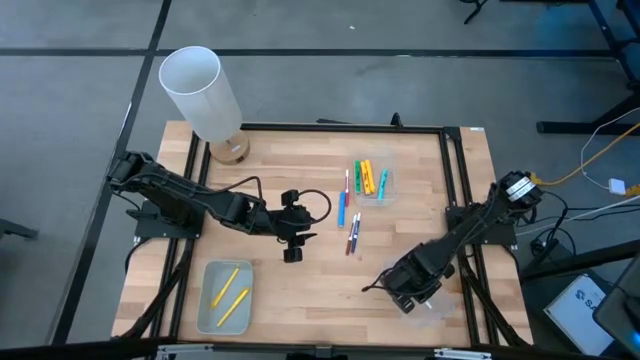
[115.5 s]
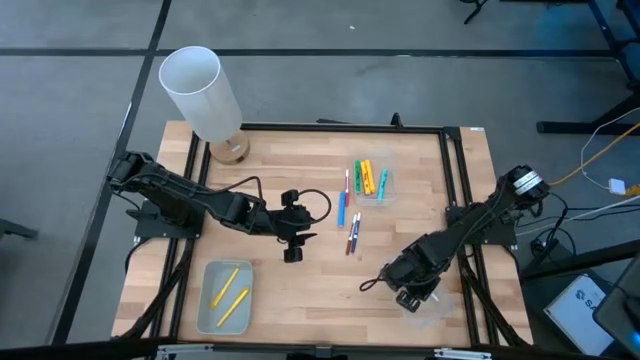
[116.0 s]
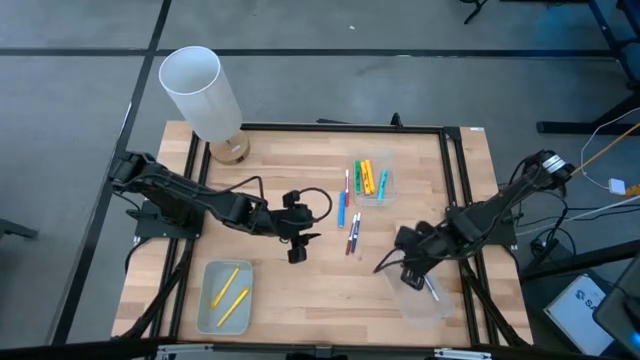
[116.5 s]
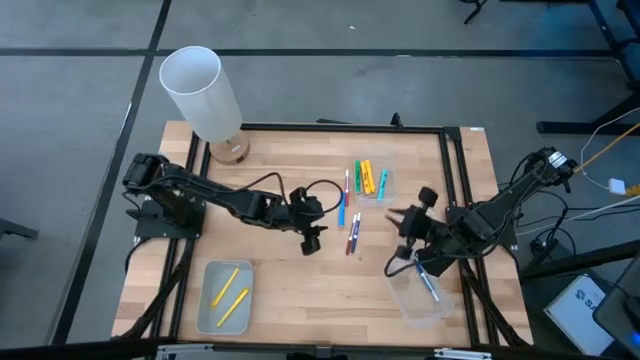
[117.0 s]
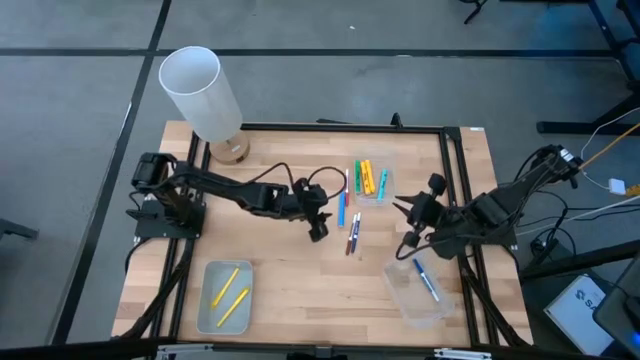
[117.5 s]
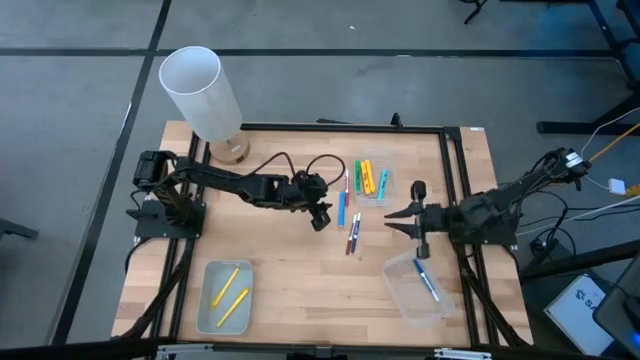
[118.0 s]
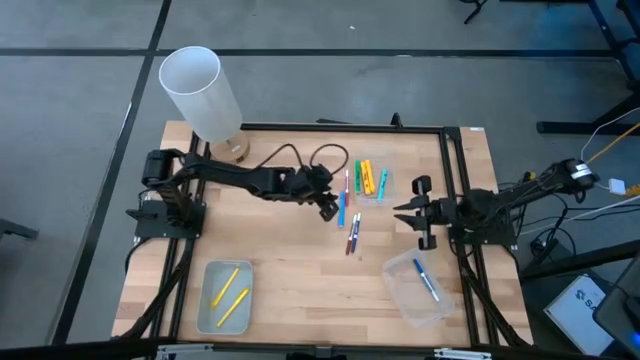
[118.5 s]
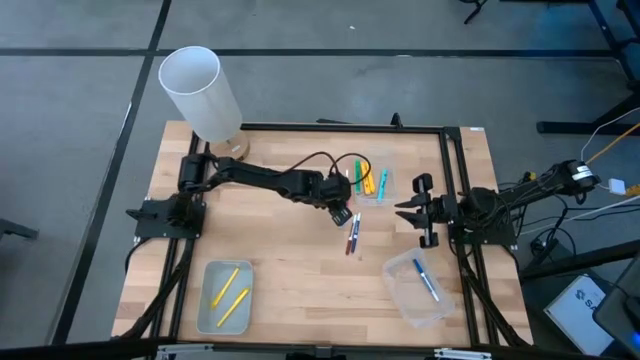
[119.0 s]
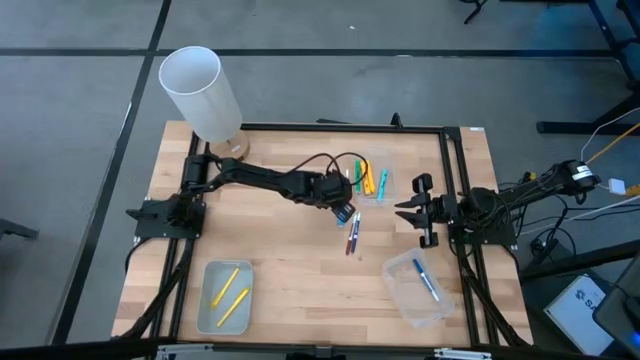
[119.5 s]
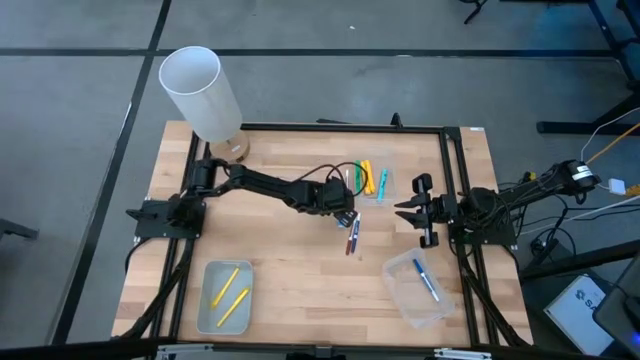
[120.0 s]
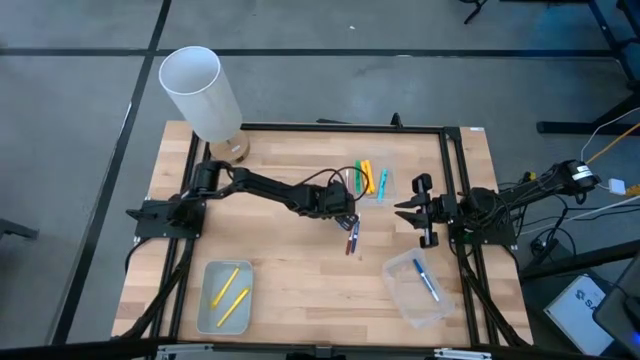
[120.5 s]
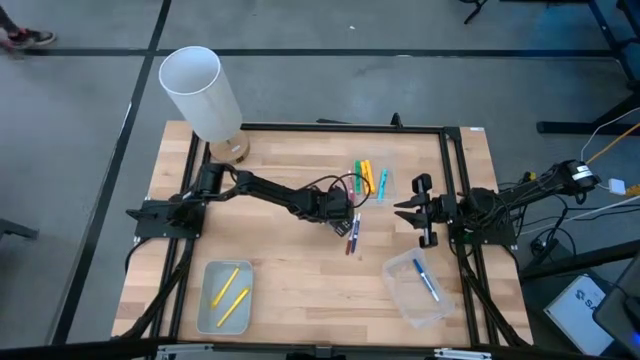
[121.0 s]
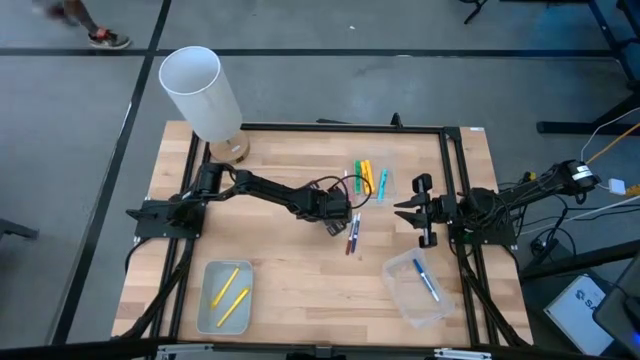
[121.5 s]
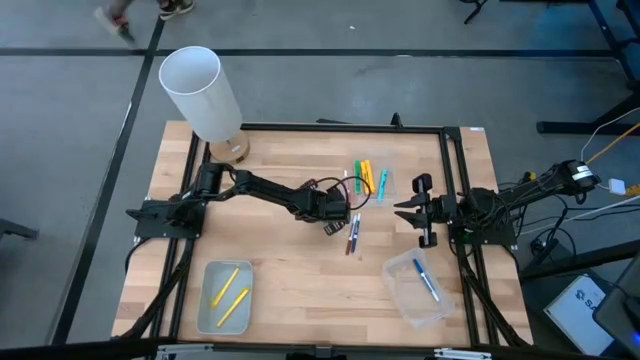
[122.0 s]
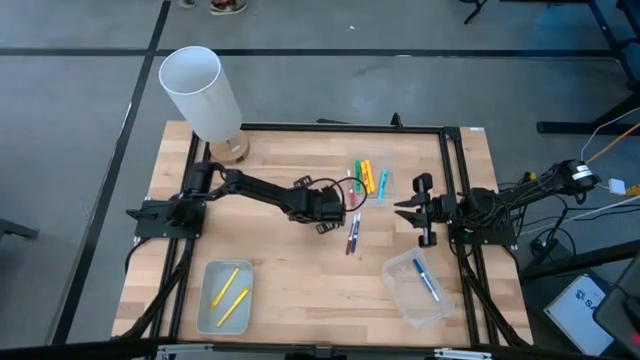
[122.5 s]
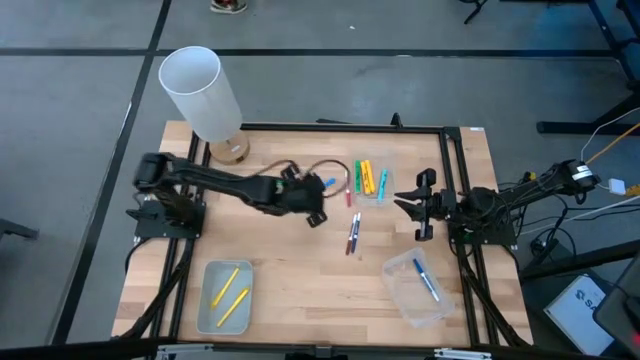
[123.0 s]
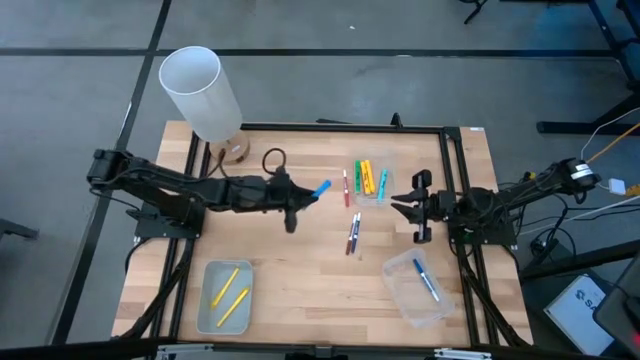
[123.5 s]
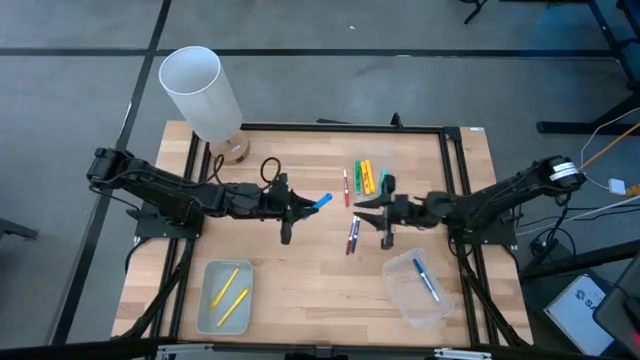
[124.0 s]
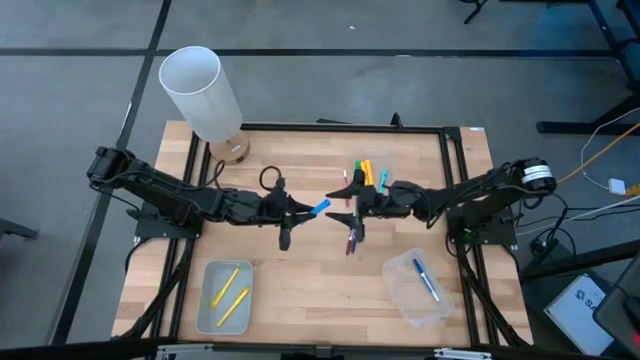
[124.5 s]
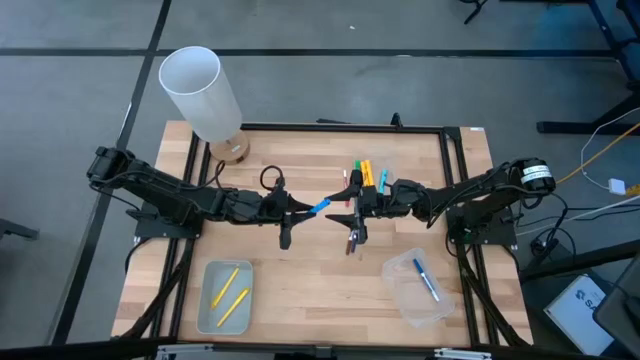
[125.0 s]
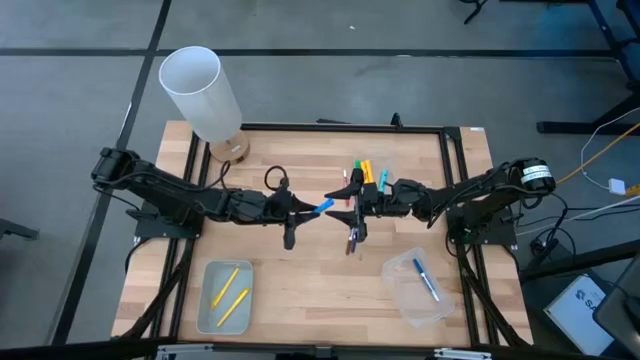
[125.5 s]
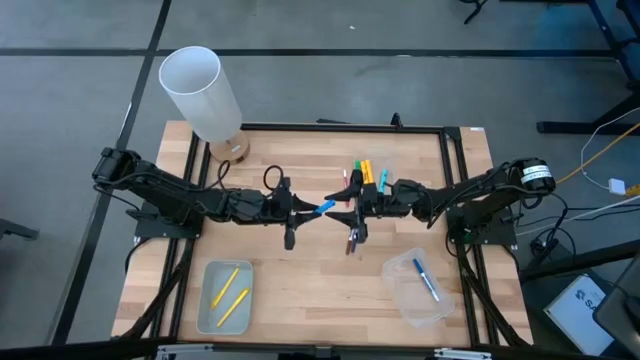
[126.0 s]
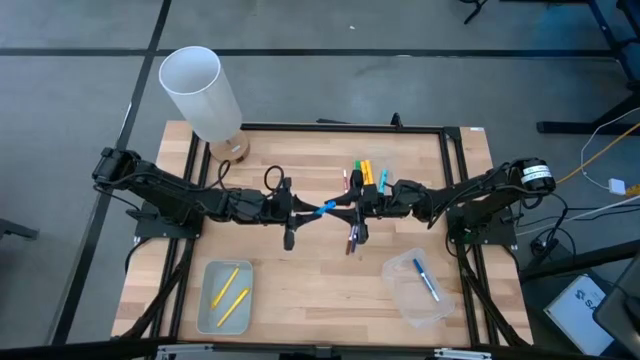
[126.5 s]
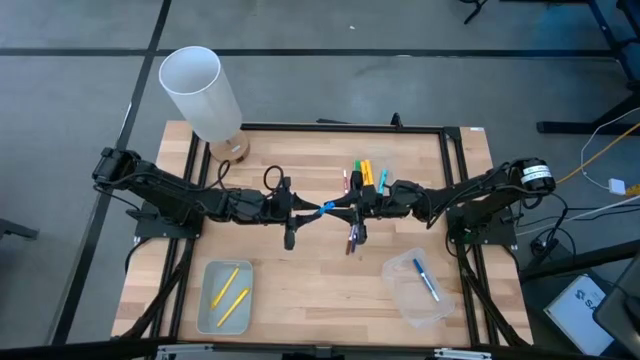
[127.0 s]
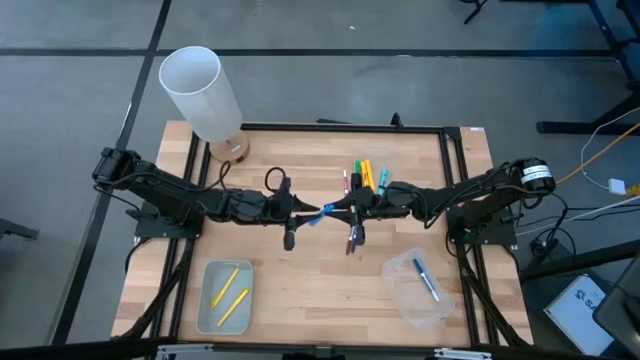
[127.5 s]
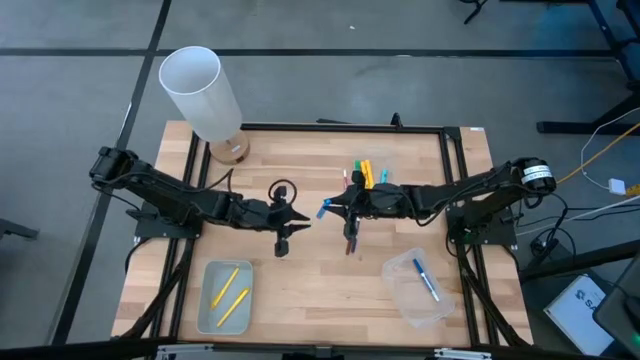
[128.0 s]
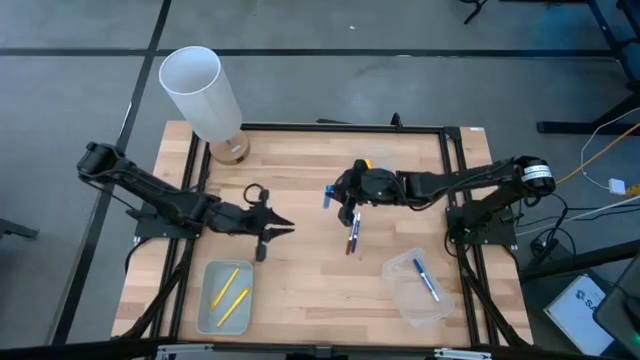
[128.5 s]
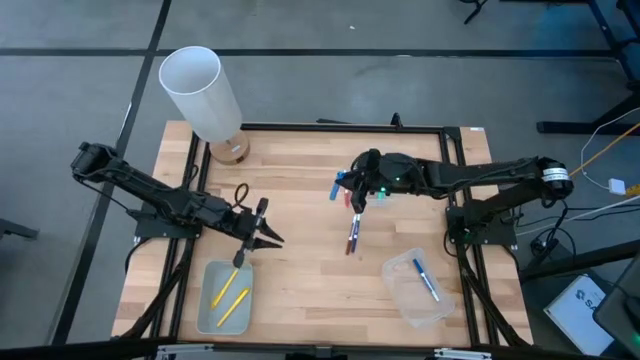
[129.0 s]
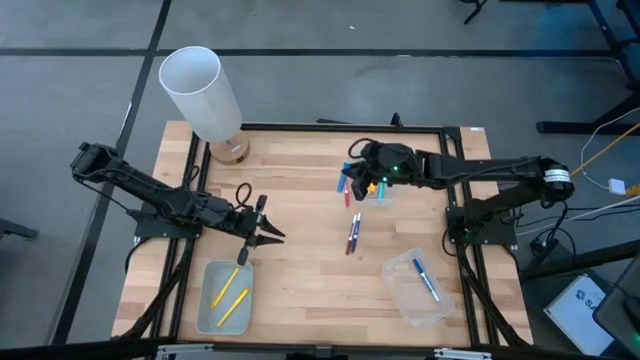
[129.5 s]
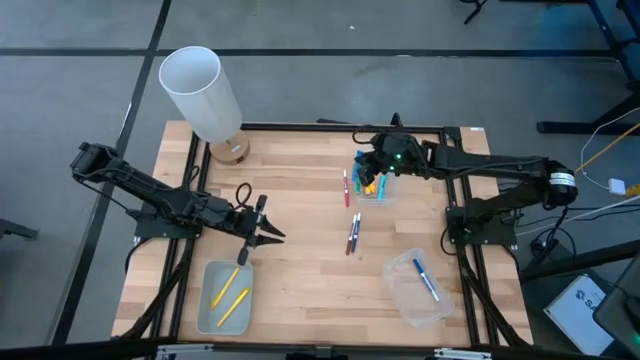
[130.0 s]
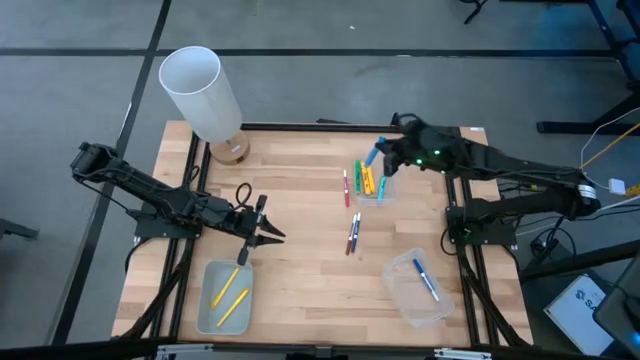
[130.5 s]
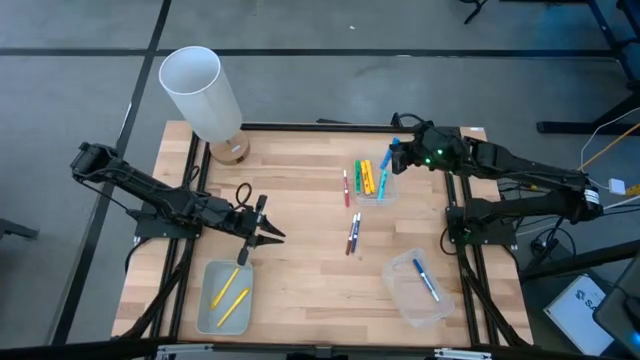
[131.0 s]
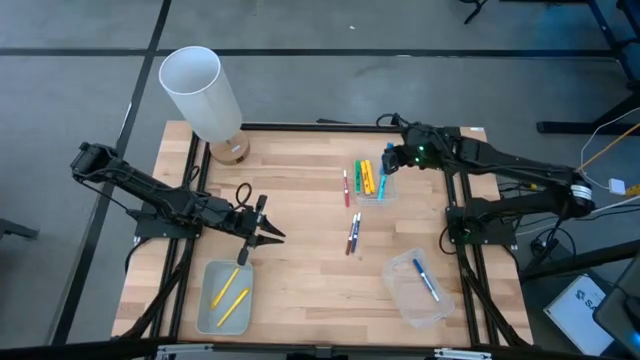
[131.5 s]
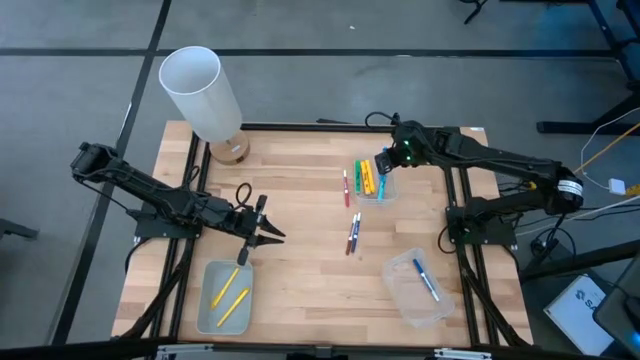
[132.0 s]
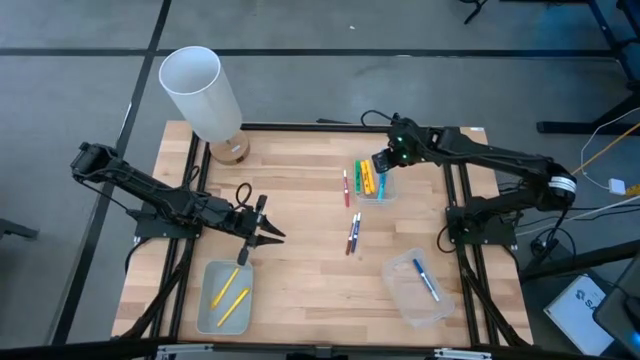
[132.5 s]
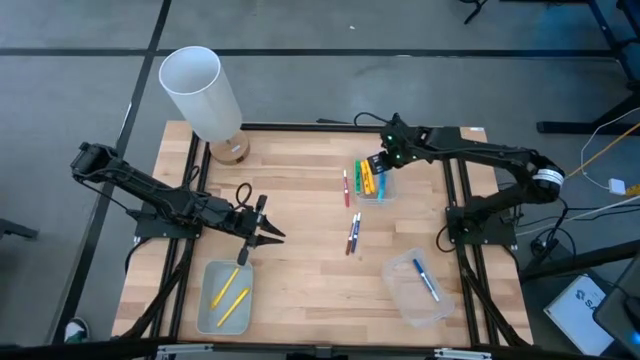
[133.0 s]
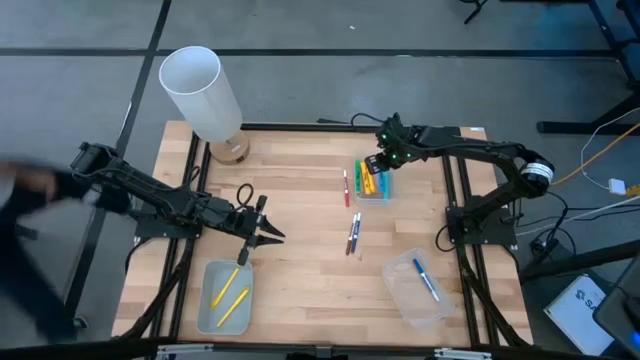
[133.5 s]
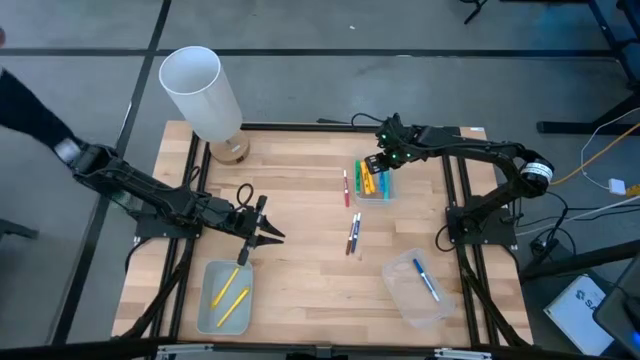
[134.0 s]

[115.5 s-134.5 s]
Task: Pick & Place Markers
Put the blue highlighter pen into the top transparent bin

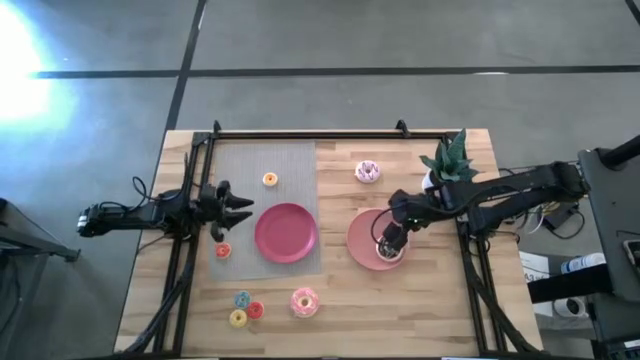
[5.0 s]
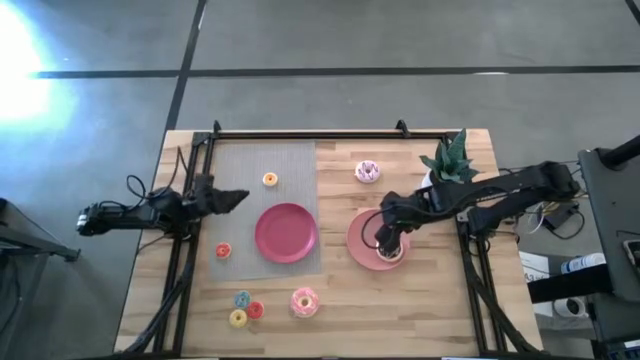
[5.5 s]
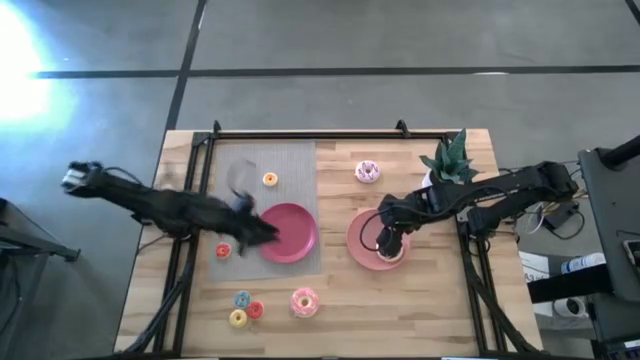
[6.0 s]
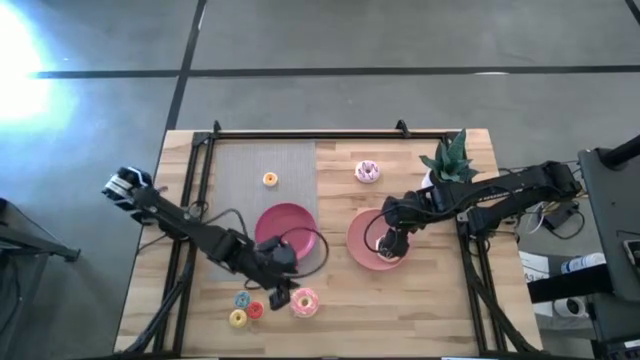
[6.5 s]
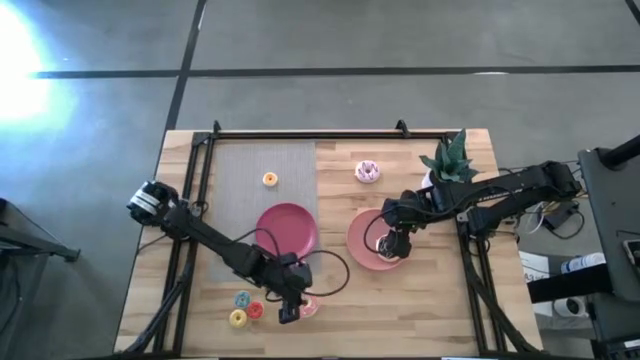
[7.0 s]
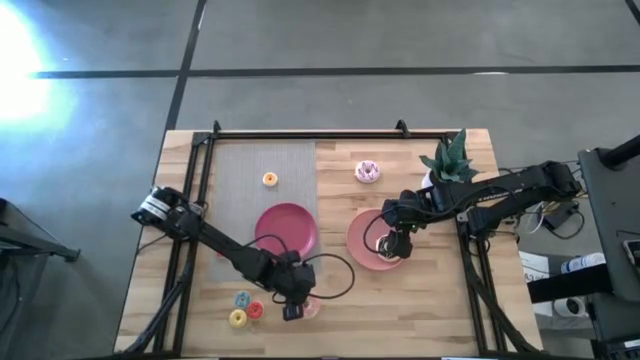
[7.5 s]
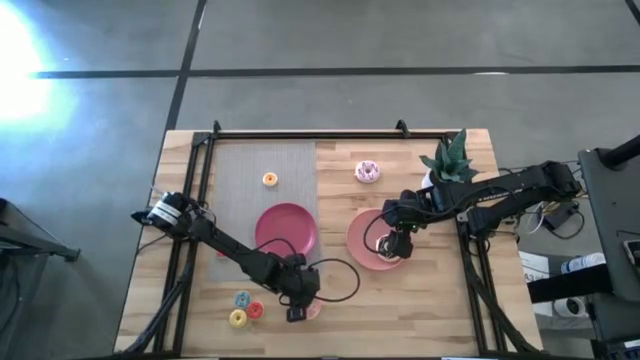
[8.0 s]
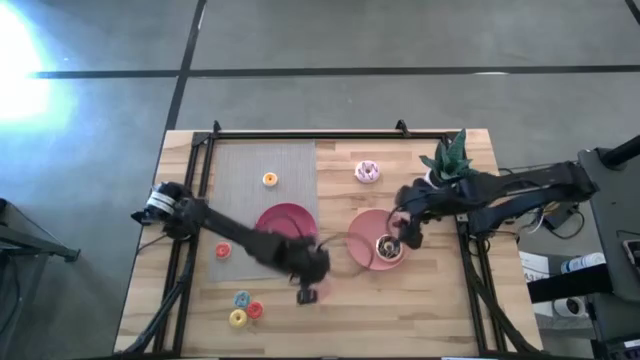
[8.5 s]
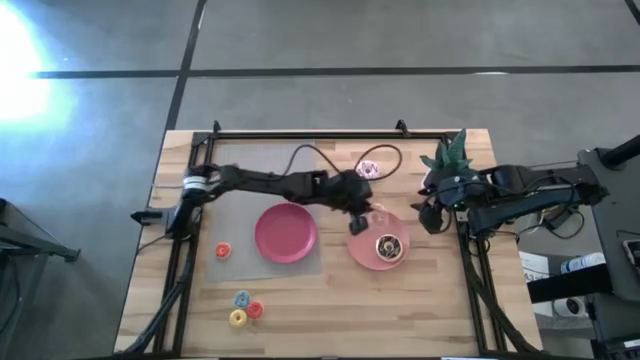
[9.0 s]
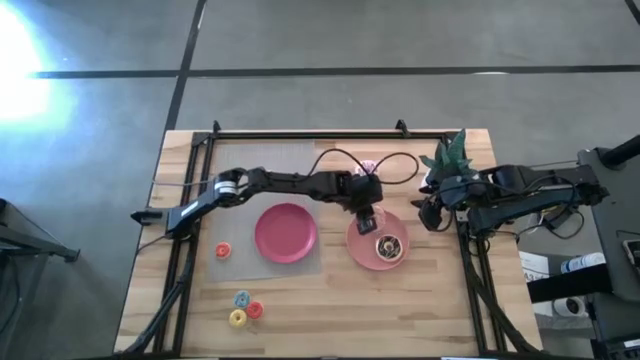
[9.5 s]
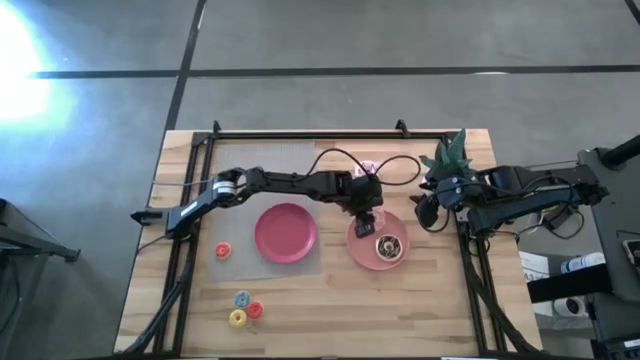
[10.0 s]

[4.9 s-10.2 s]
Task: Pick & Place donuts
Put the large pink donut on the light pink plate
